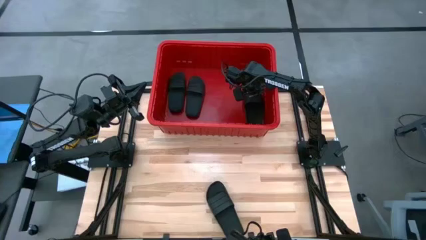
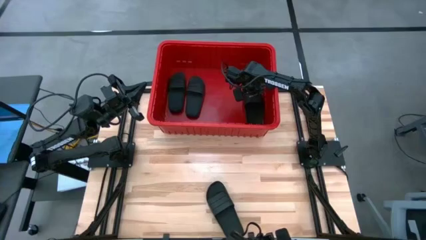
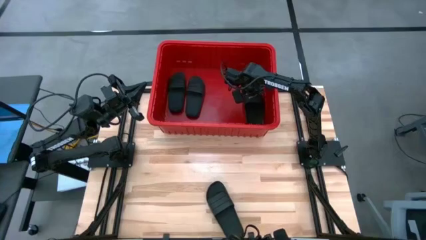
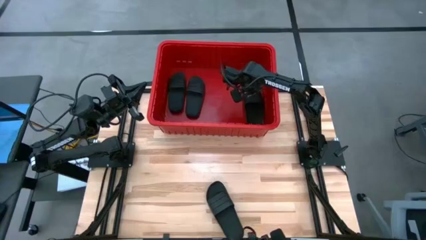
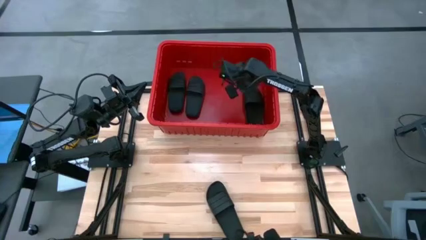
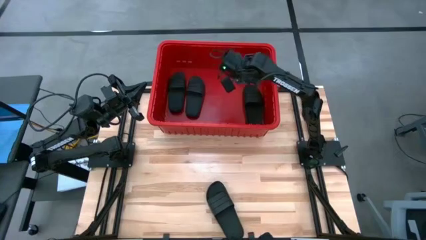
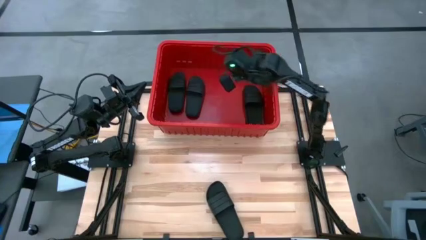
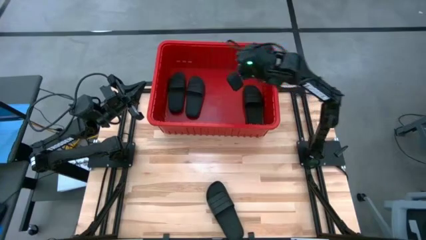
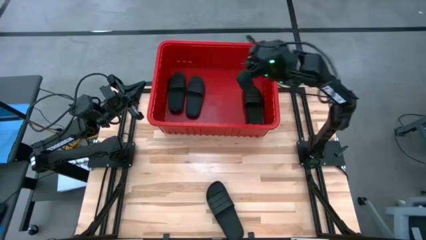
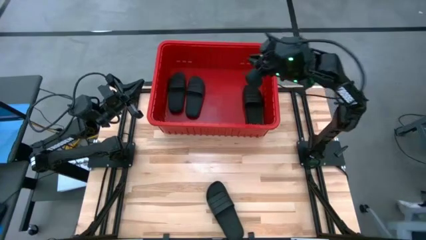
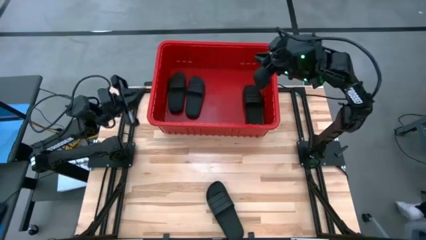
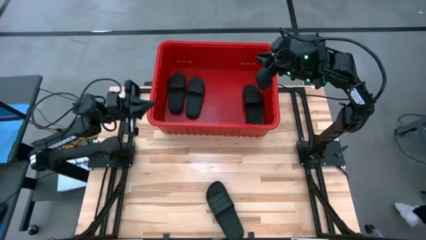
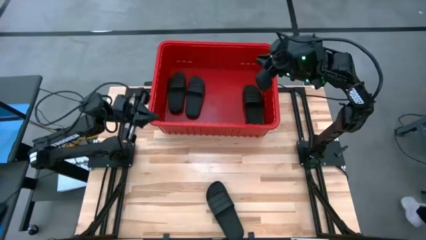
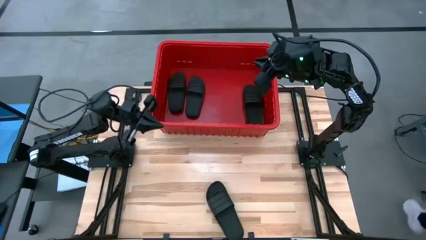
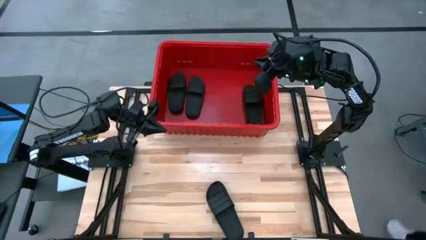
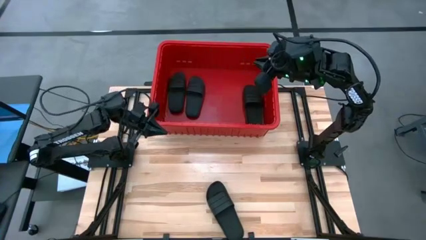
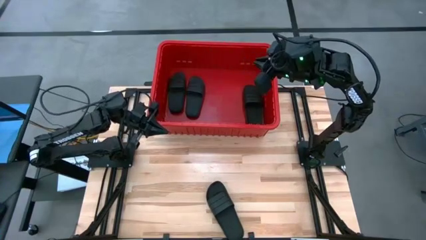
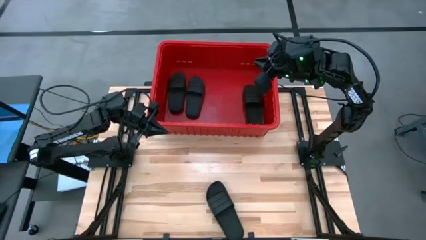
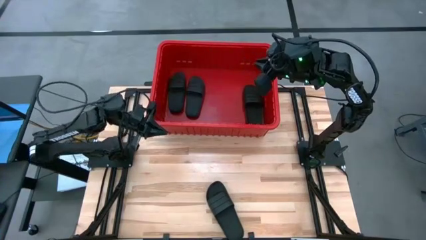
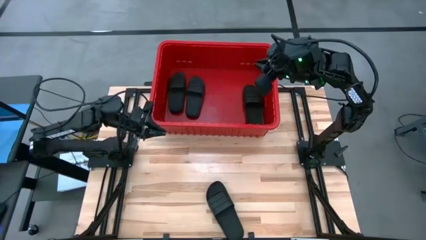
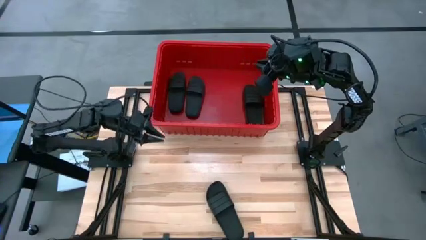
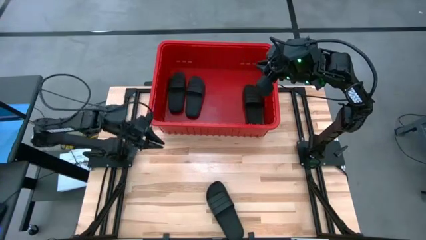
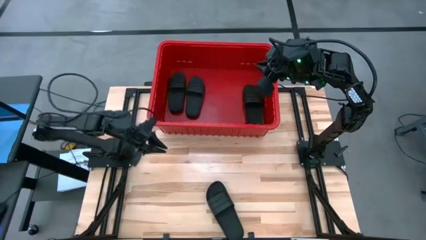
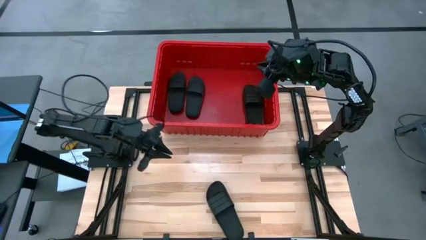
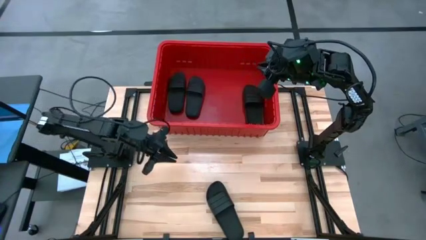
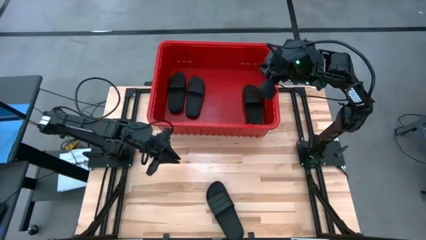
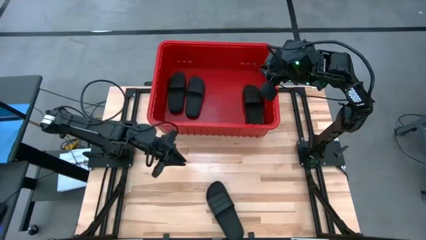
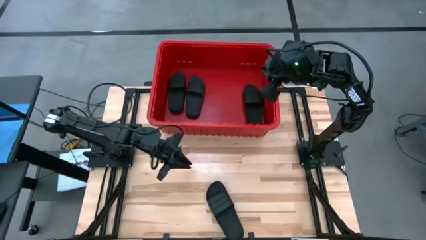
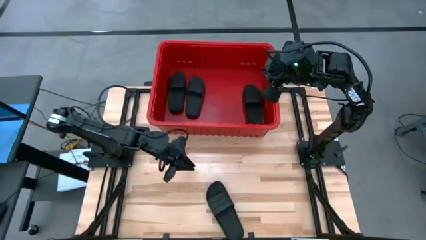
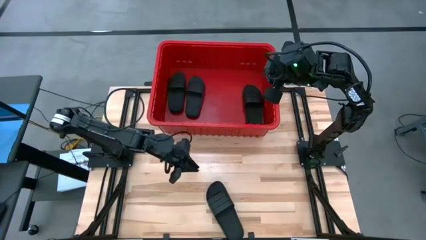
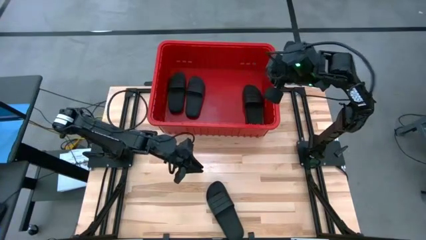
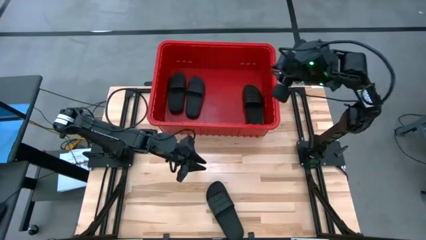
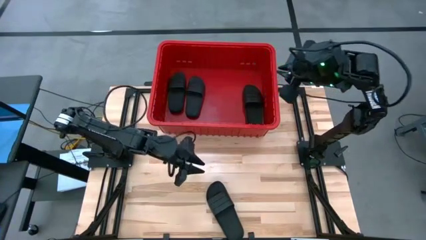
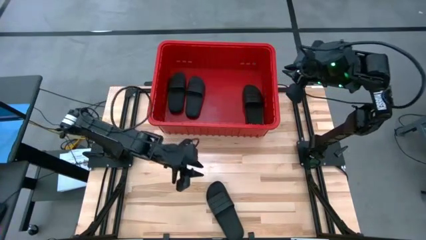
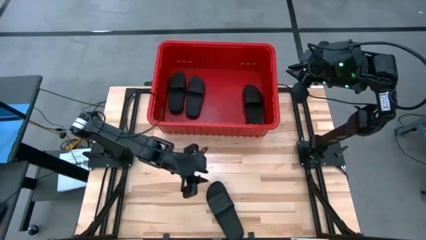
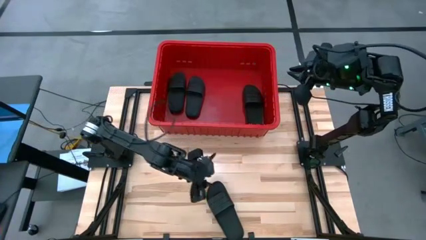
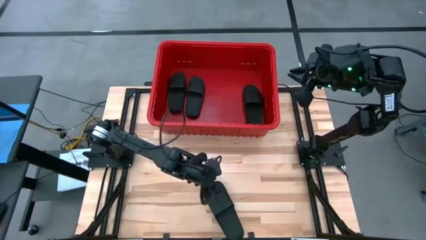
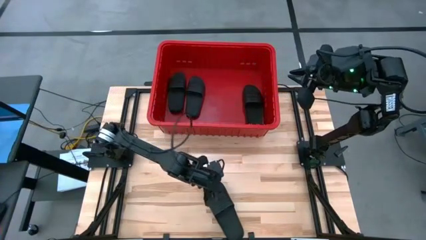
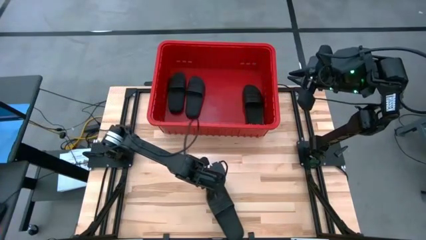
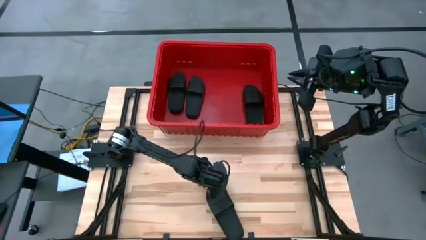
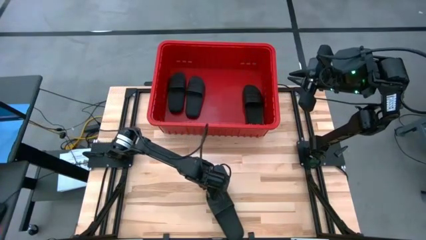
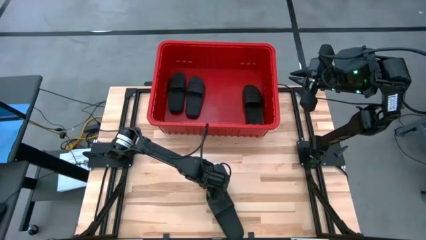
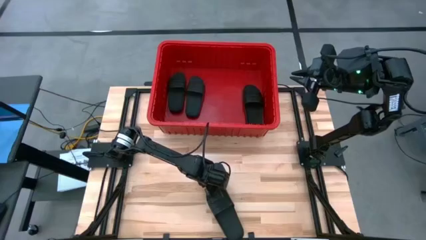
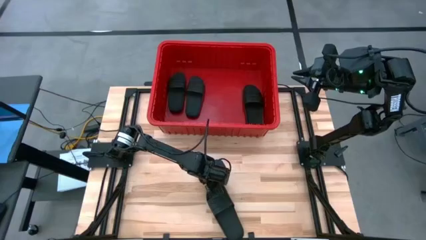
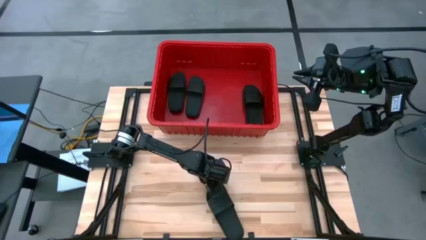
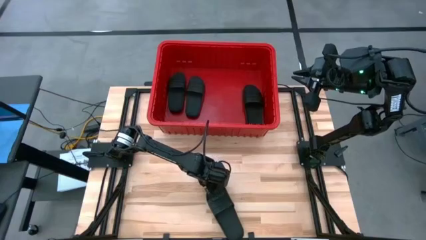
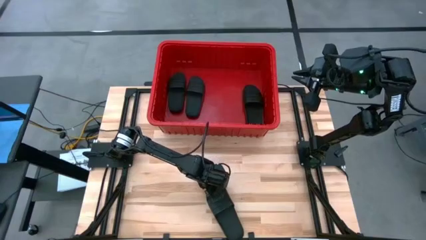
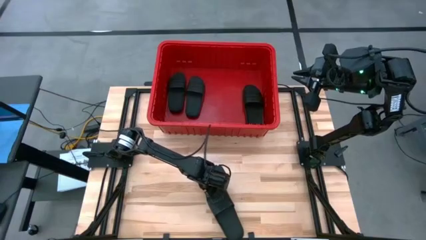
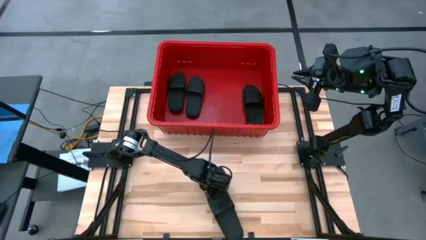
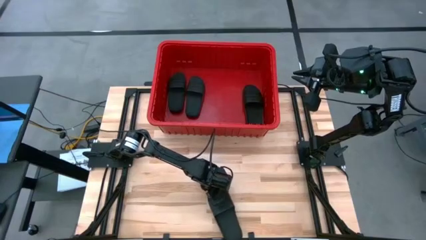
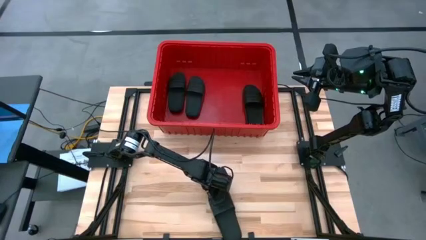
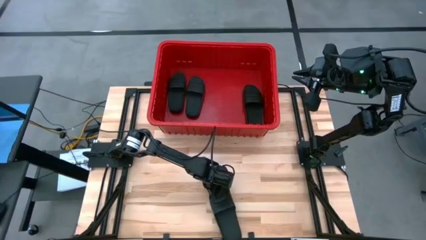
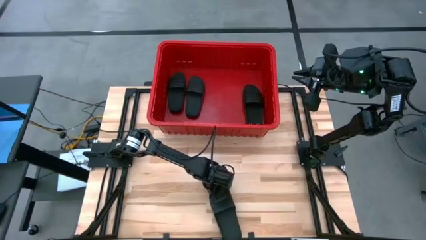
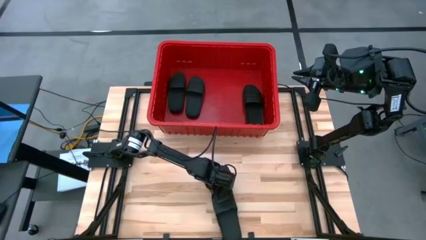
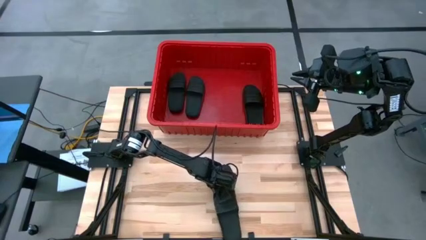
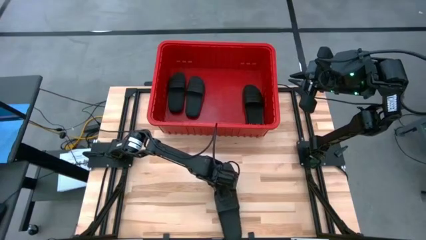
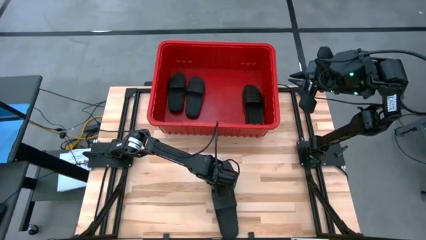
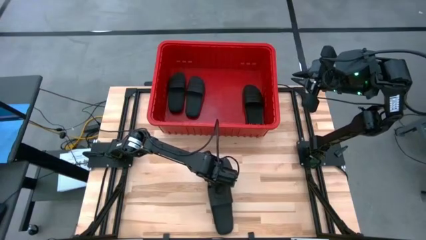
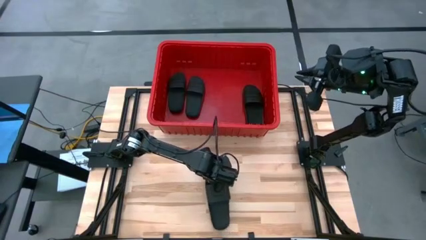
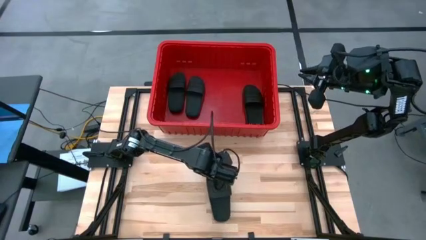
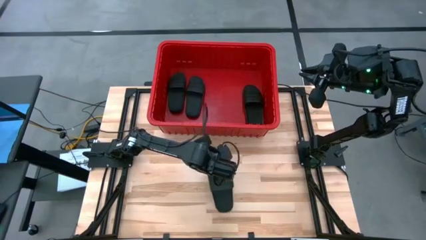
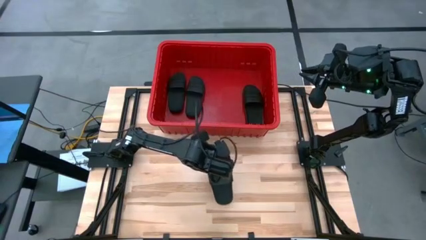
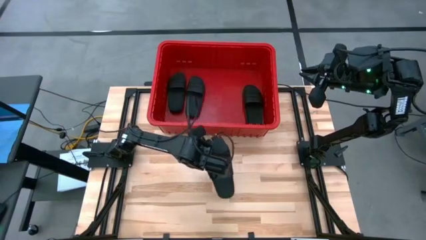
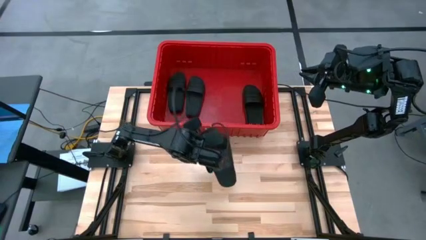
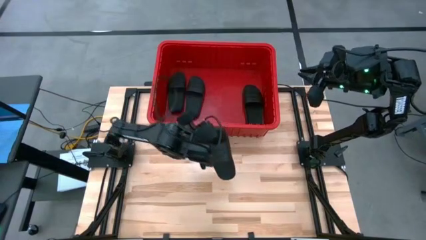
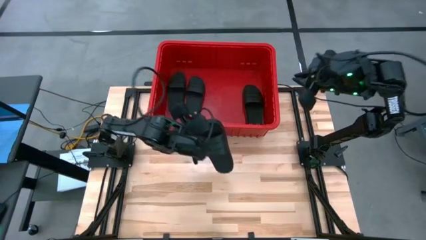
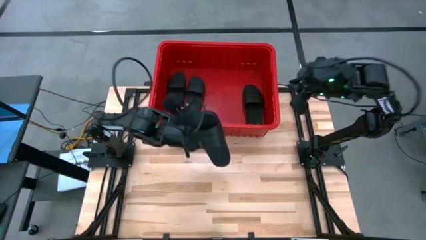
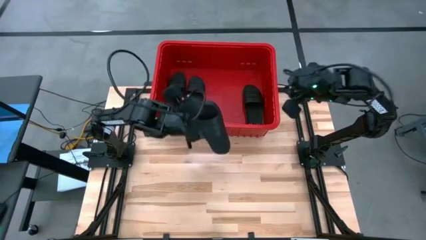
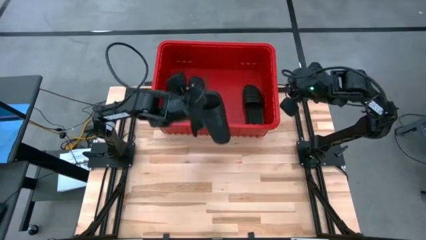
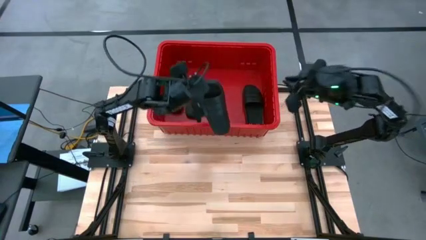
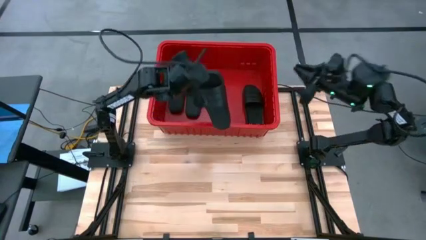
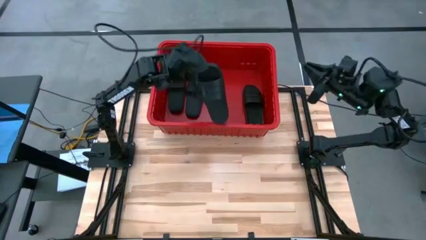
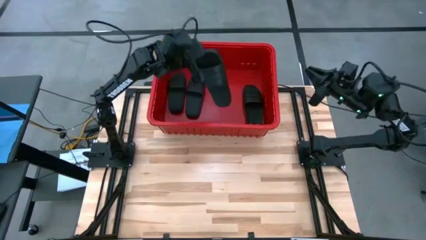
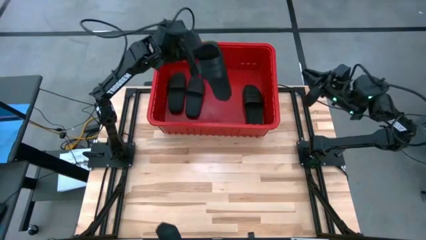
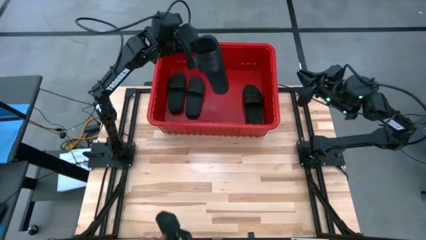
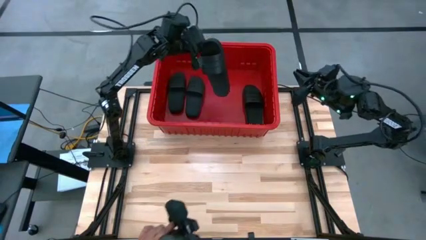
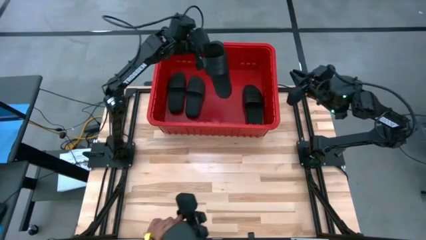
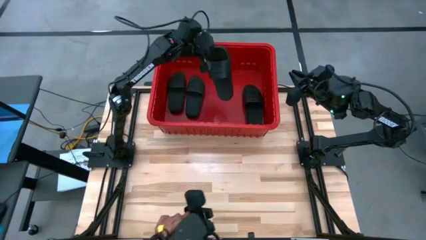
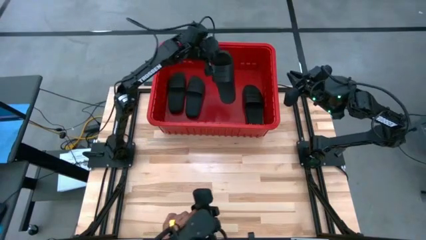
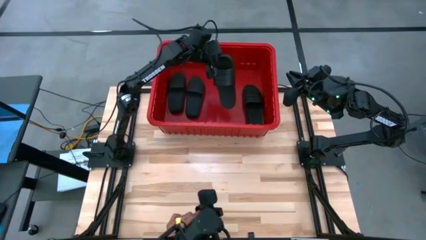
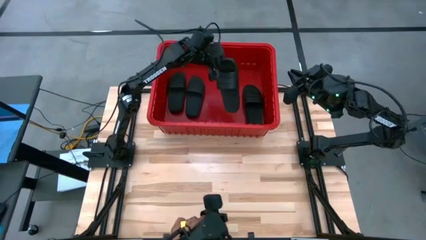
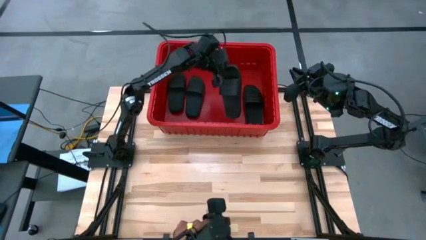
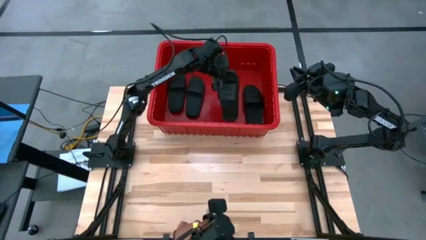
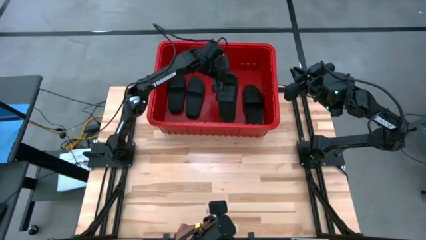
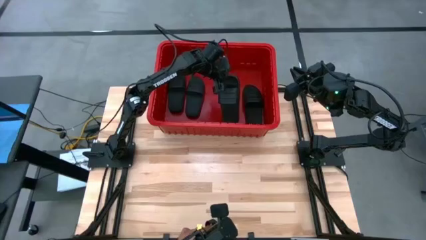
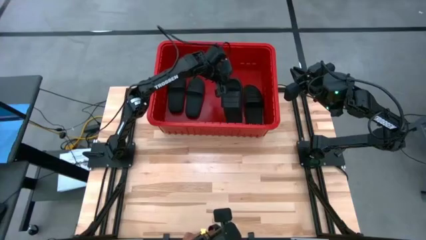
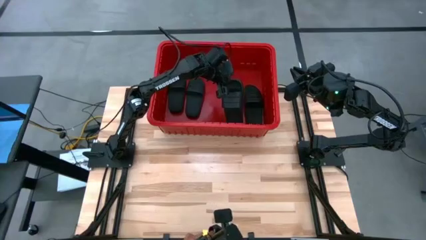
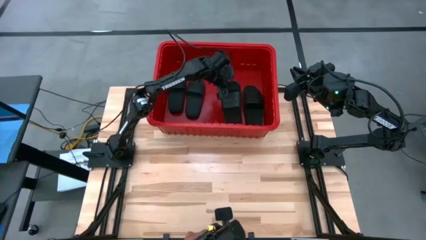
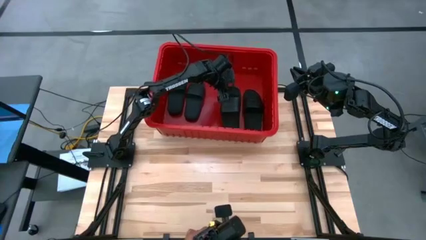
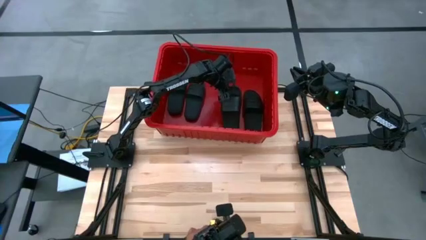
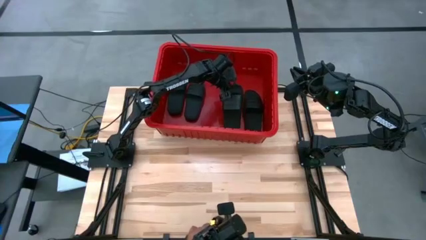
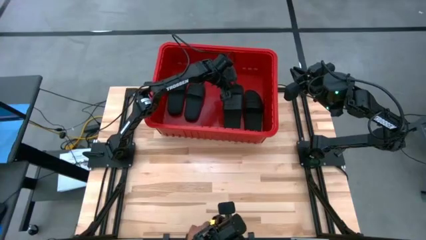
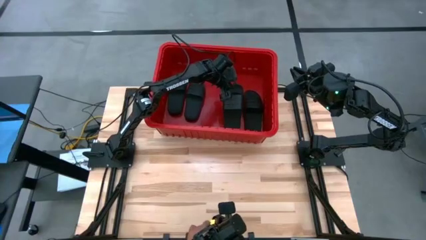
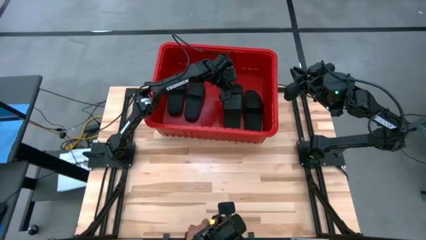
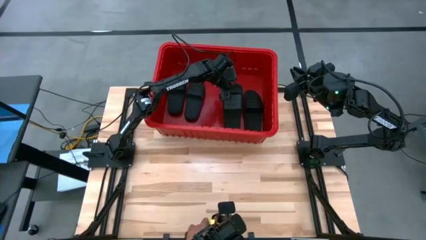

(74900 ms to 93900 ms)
Task: Pick and place slides into bin
Put the slipper into the organizer bin
